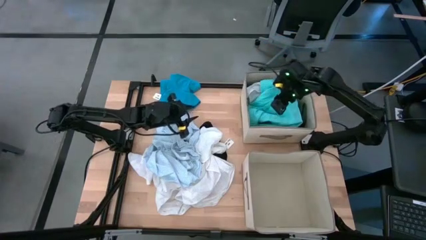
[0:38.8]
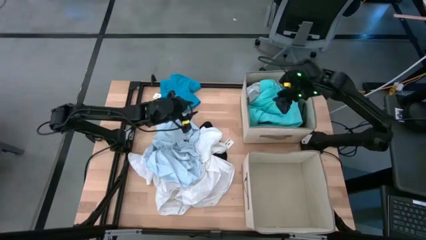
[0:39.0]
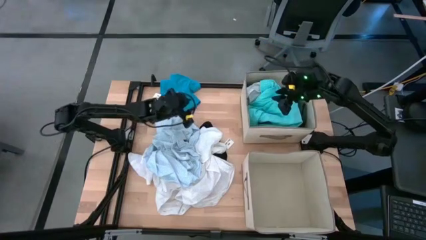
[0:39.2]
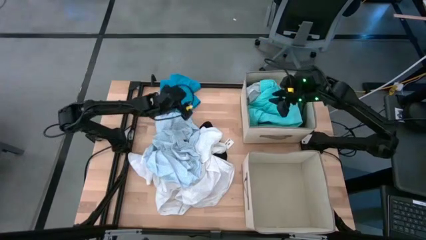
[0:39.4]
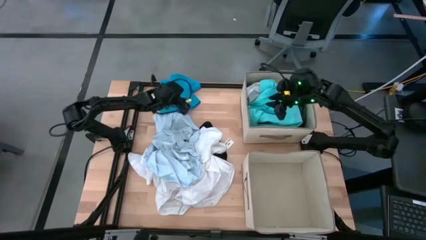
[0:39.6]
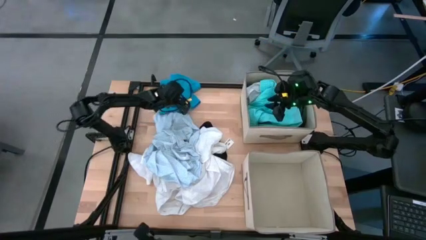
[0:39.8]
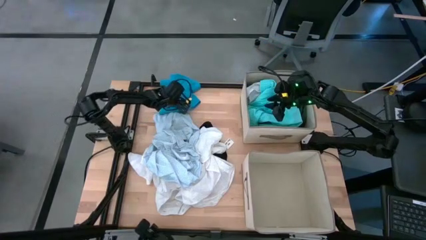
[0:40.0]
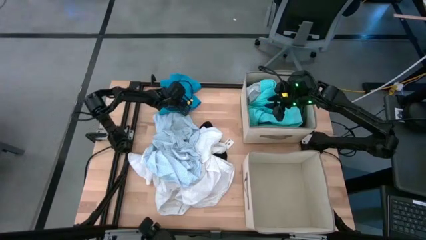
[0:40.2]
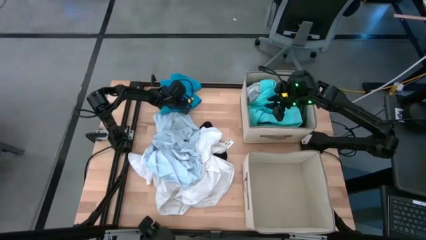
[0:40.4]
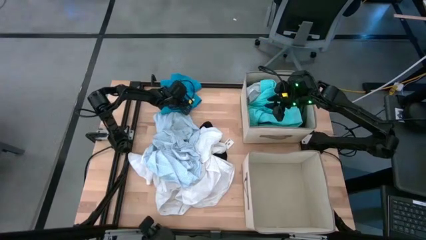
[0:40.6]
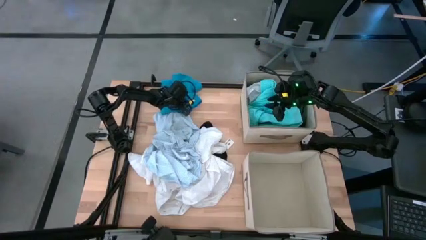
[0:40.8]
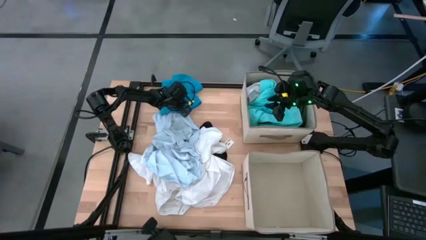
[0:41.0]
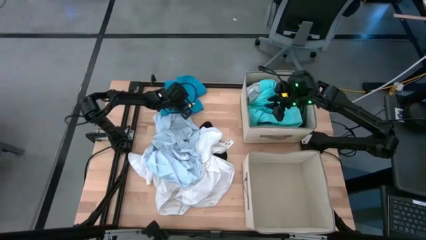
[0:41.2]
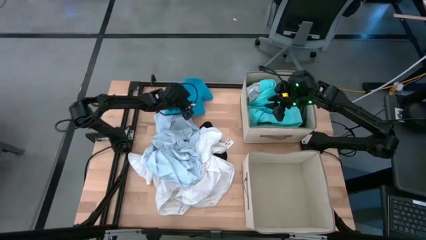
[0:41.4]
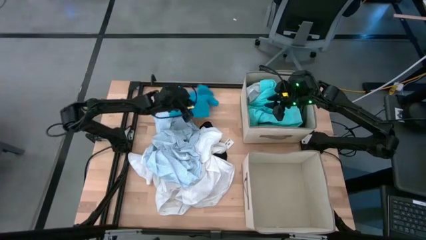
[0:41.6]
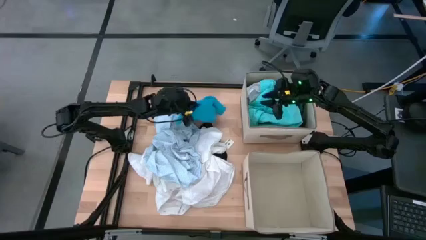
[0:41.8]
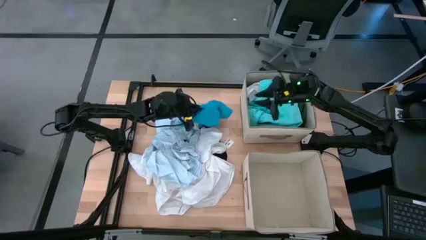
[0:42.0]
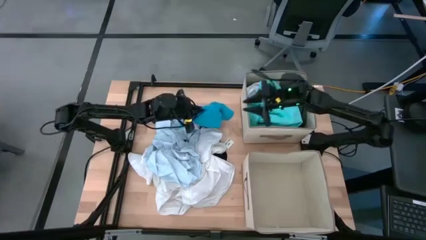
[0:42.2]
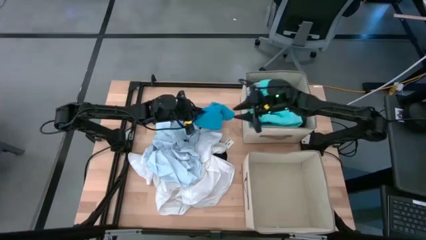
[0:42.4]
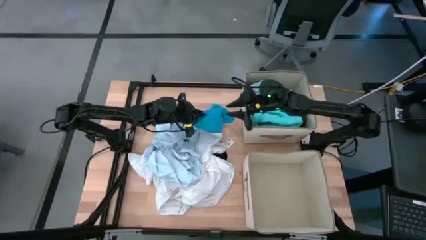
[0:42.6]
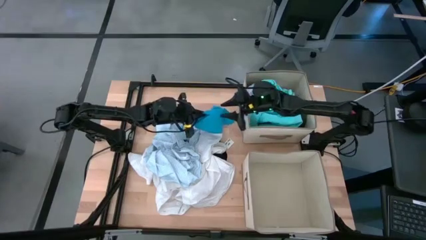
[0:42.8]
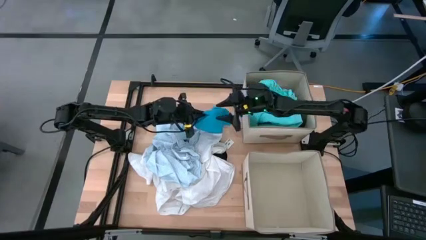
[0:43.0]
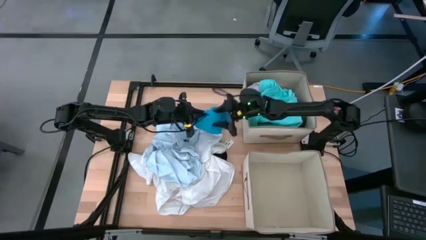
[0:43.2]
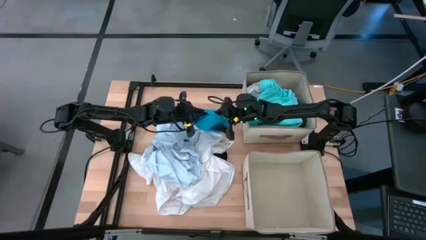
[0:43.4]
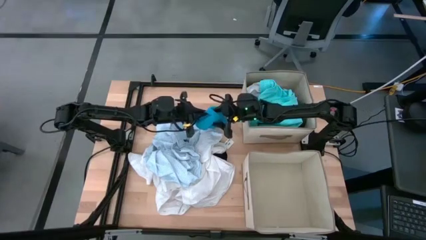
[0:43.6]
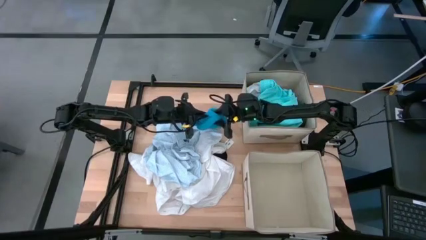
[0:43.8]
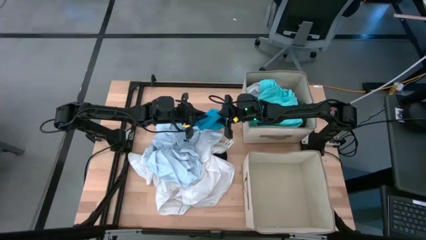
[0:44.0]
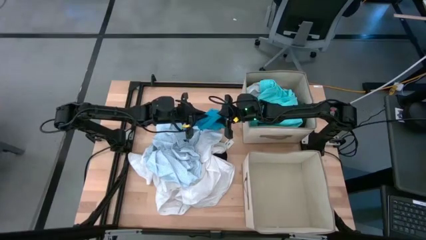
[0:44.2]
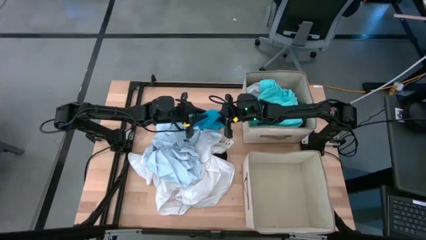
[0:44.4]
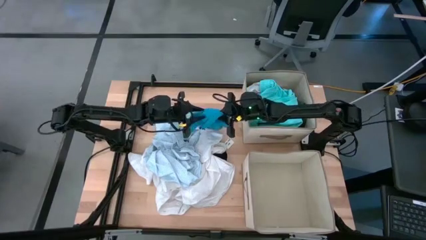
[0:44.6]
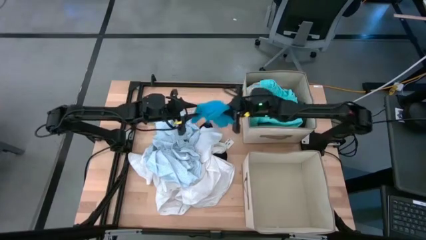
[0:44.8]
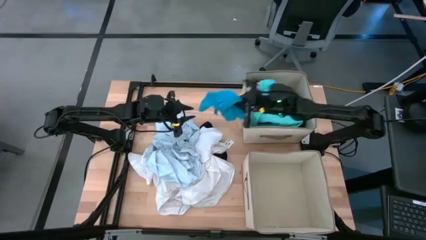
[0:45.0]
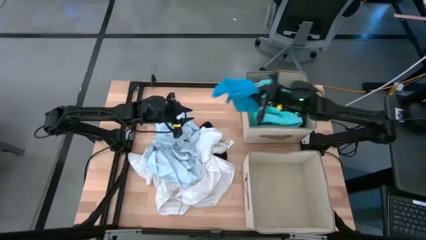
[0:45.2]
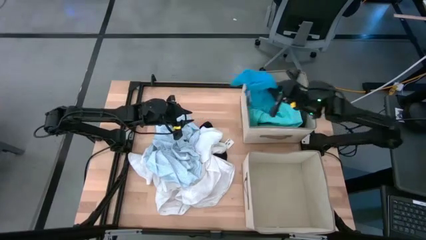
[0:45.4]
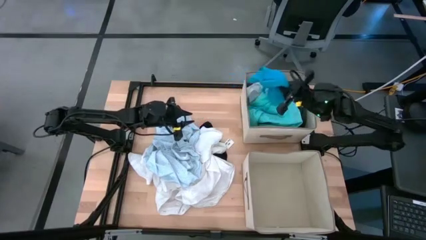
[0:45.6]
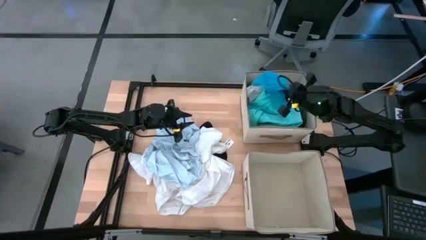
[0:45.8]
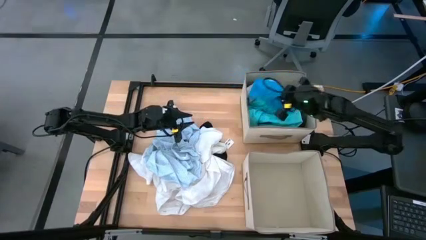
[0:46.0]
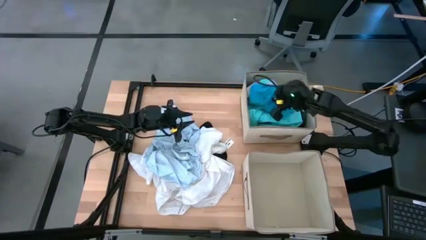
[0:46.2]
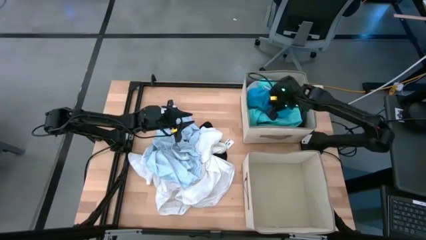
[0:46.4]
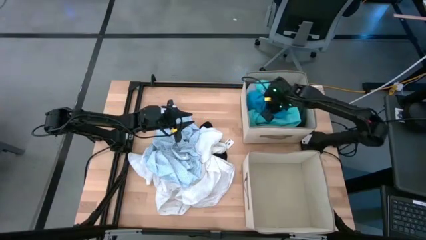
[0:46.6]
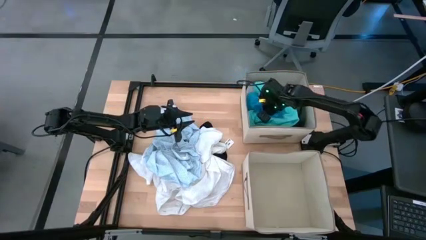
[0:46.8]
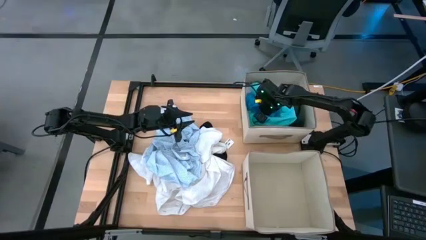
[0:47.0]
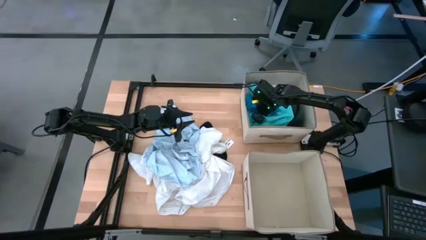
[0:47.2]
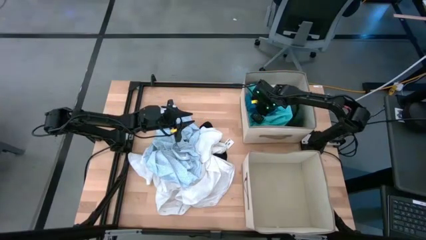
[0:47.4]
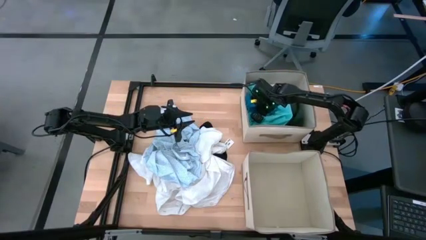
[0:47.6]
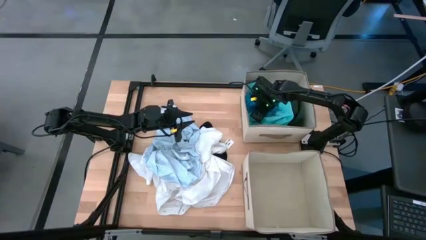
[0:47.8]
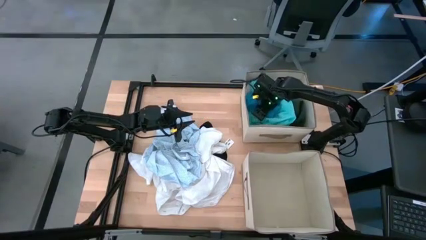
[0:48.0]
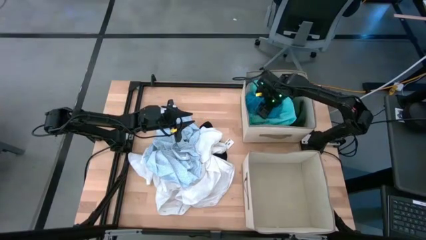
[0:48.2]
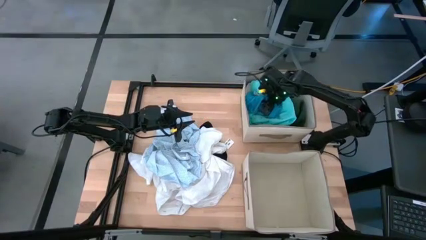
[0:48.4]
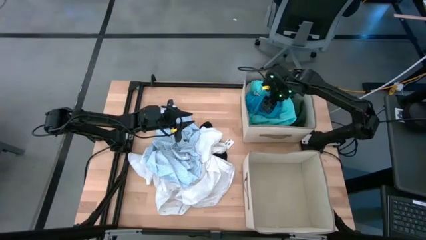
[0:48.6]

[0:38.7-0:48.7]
Task: Sort clothes
Put the blue shorts into the top bin

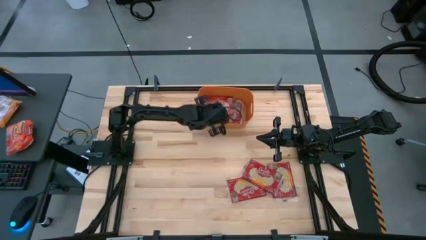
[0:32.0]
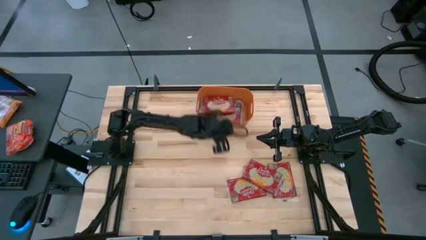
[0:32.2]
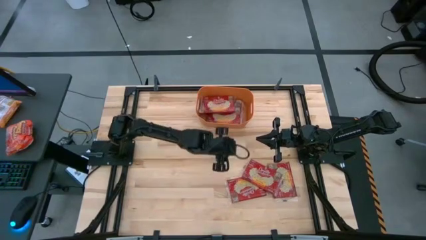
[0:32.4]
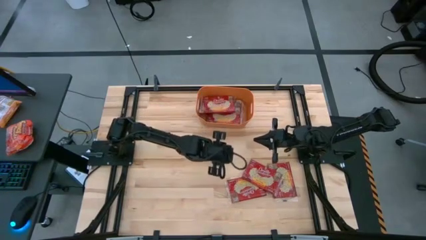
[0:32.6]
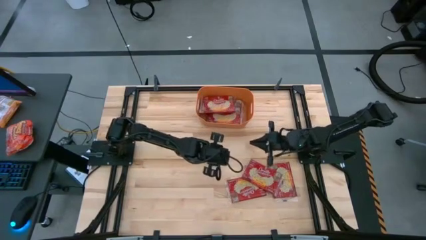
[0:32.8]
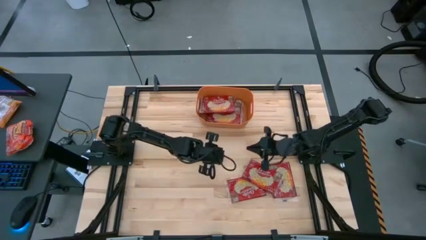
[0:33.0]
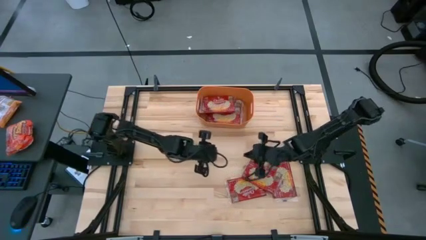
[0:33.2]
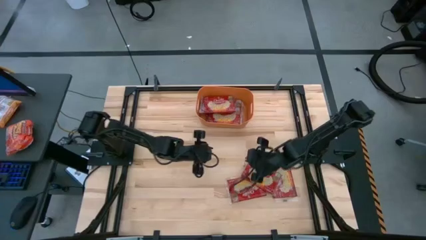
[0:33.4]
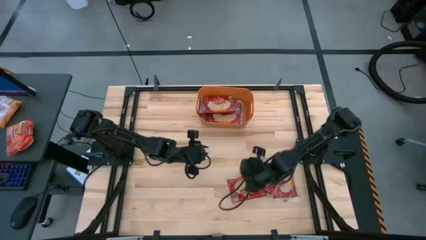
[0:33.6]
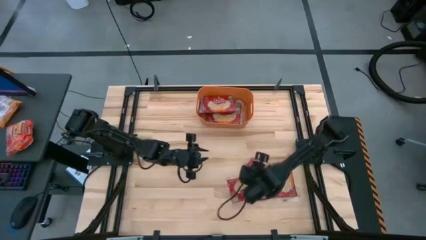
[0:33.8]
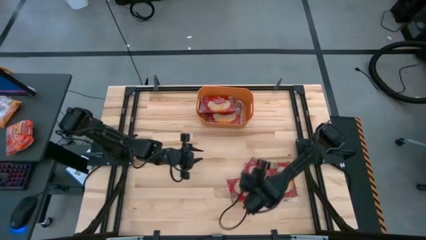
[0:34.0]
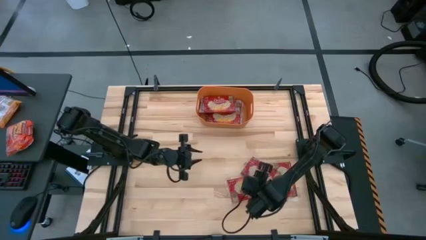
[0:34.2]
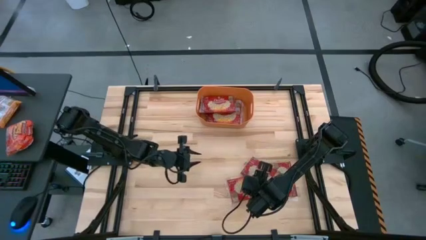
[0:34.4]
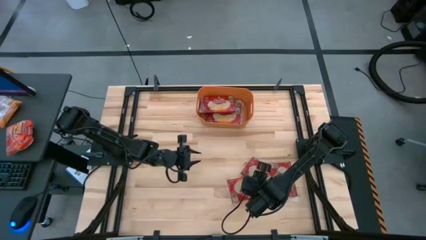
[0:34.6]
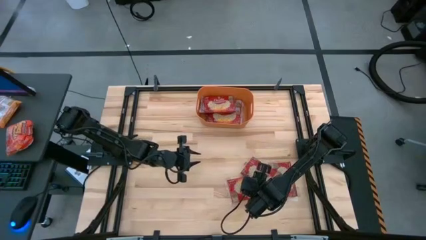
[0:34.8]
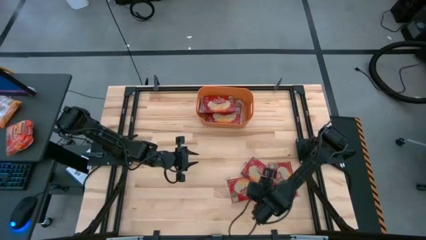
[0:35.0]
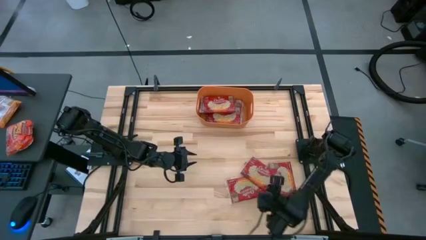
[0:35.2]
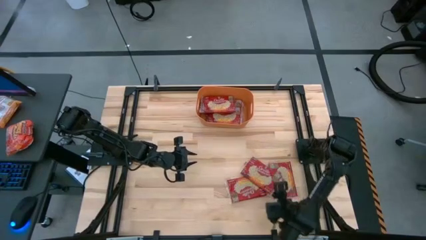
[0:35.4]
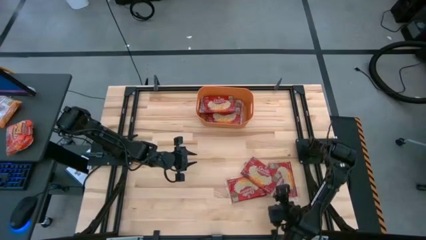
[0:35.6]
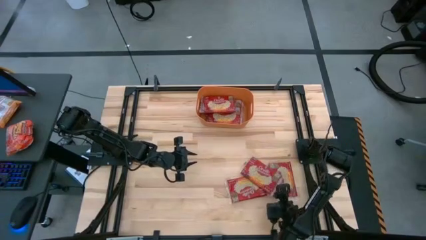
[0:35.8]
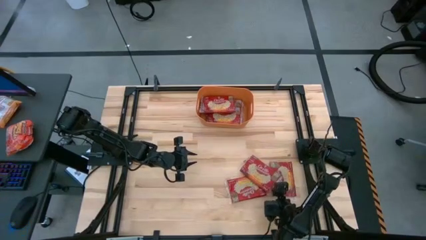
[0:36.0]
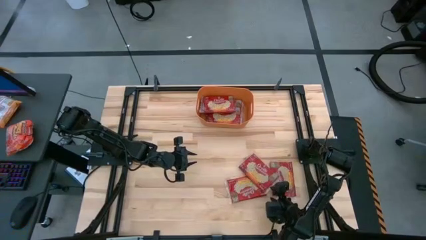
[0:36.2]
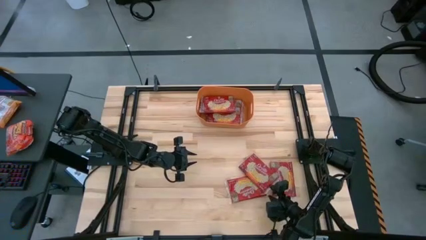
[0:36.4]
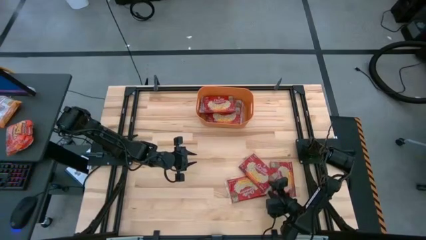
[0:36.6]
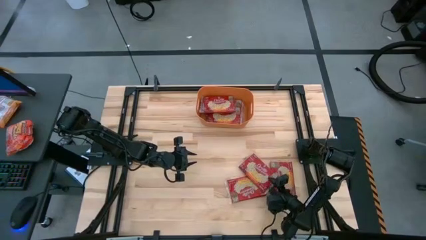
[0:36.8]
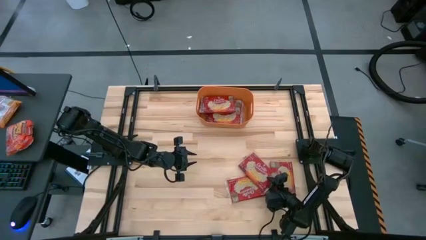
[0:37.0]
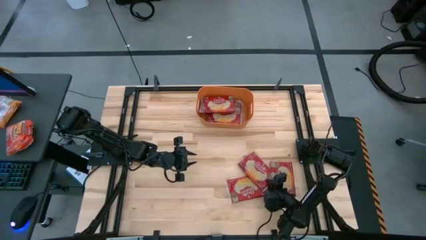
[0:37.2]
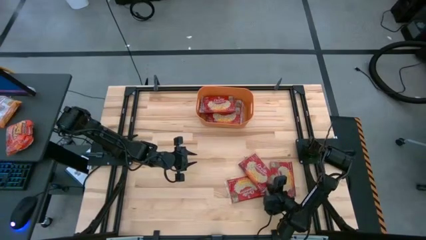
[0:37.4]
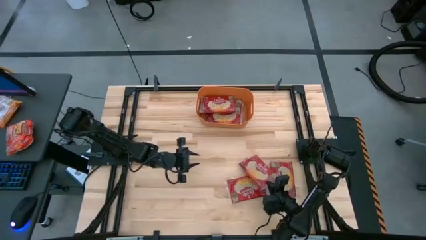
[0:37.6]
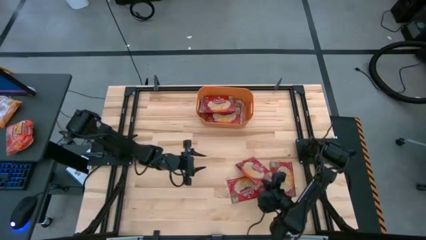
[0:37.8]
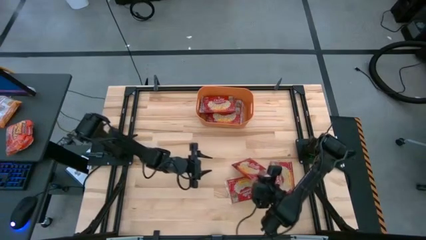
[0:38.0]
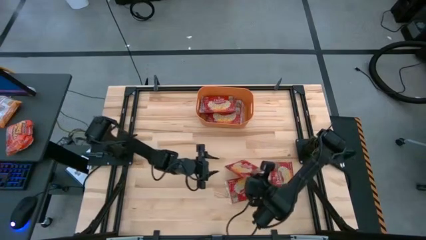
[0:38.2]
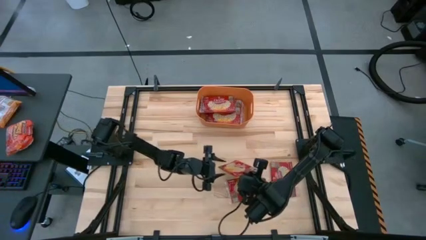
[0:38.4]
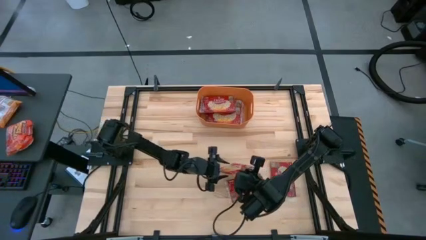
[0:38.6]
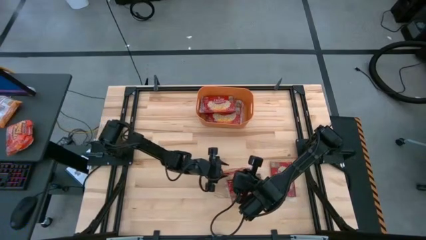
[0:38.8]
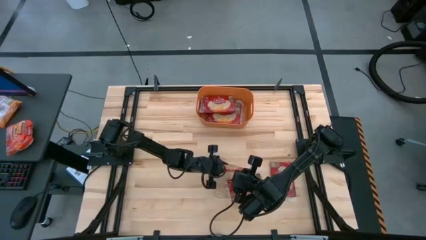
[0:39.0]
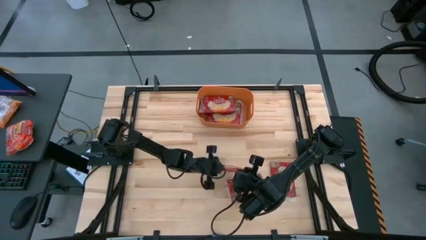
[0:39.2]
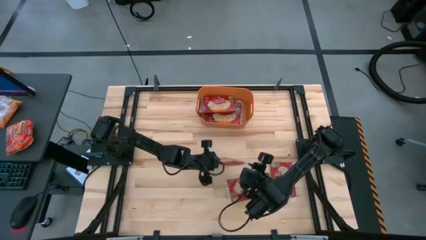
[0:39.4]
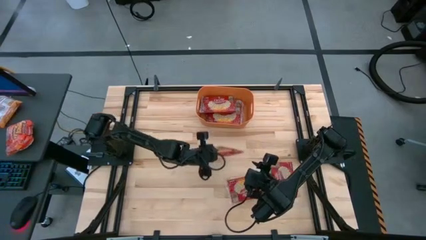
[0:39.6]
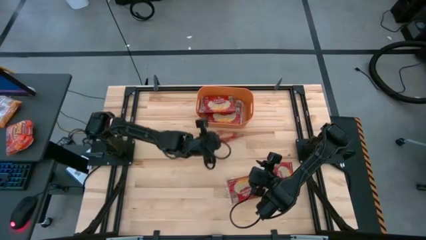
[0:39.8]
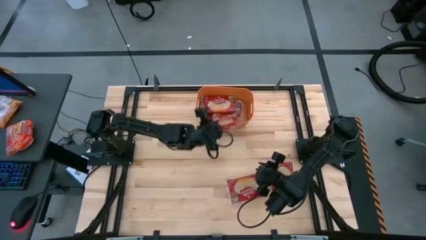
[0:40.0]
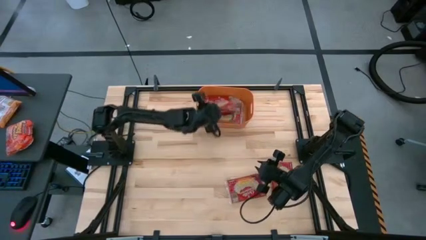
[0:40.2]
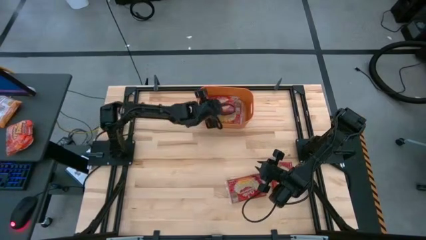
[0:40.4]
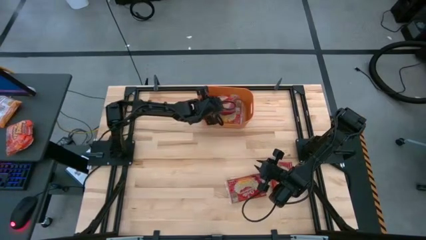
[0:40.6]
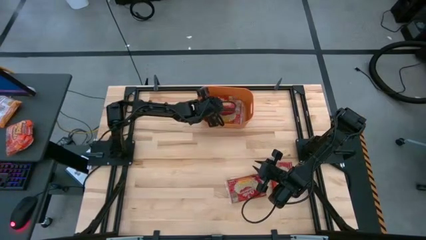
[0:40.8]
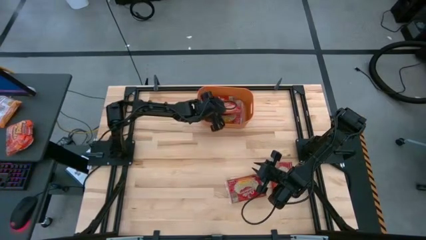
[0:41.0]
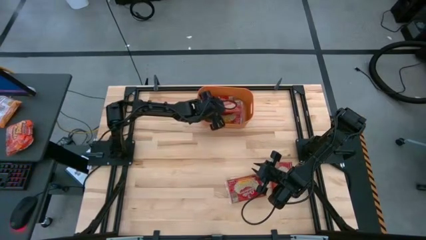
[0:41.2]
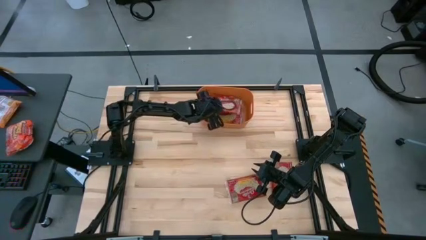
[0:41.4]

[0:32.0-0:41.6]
Task: Sort popcorn bags into baskets
Put the red popcorn bag into the orange bin
